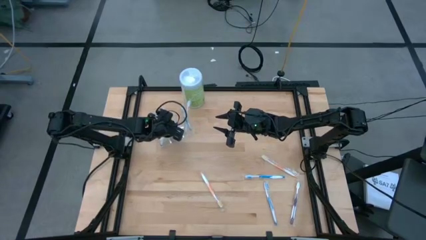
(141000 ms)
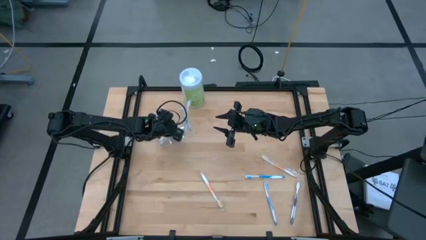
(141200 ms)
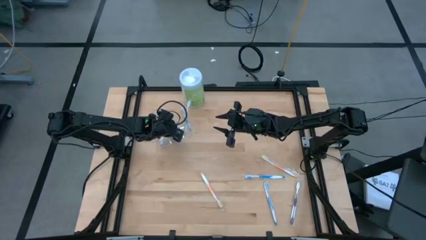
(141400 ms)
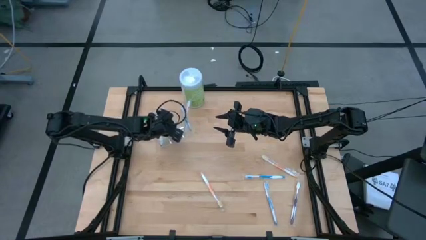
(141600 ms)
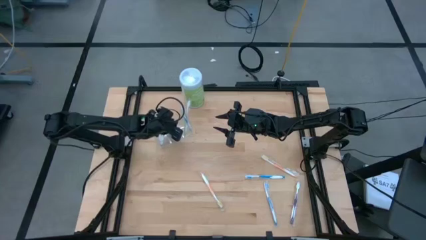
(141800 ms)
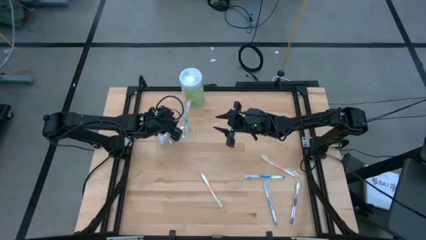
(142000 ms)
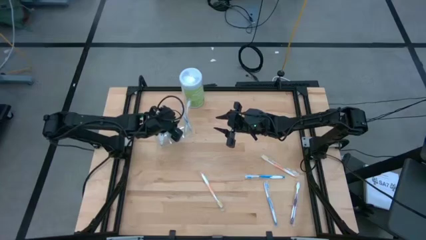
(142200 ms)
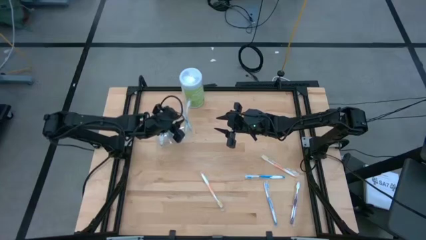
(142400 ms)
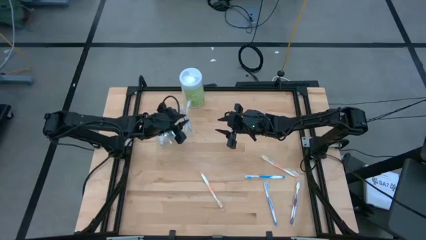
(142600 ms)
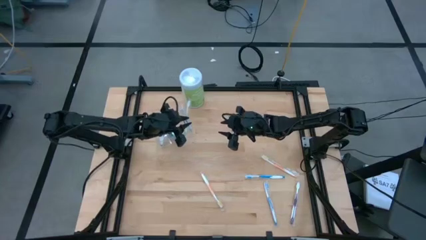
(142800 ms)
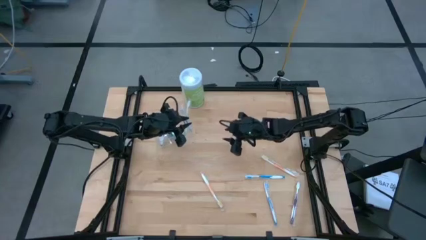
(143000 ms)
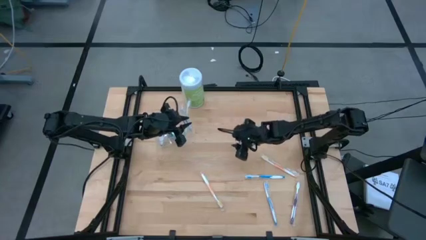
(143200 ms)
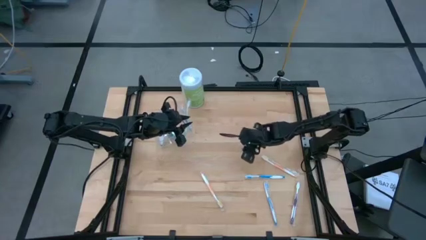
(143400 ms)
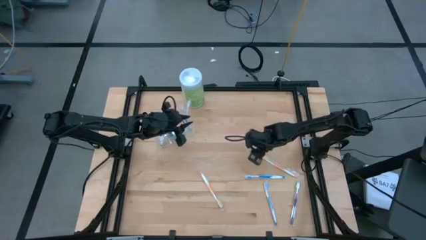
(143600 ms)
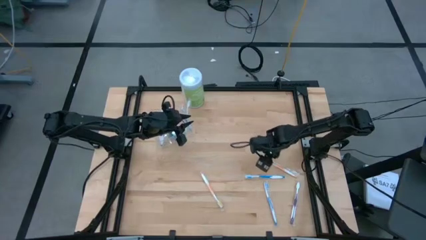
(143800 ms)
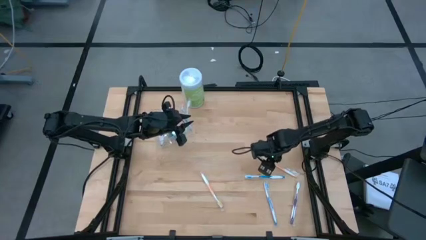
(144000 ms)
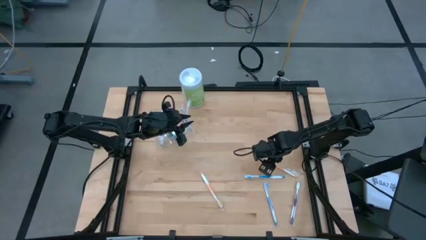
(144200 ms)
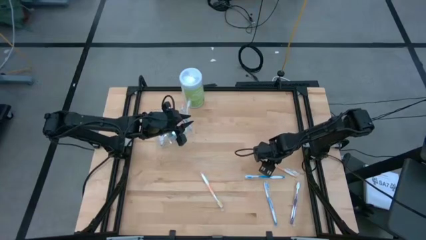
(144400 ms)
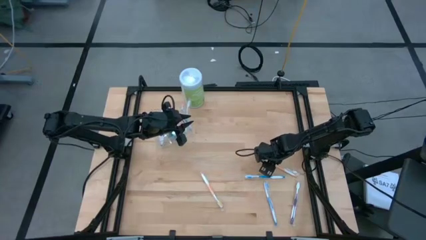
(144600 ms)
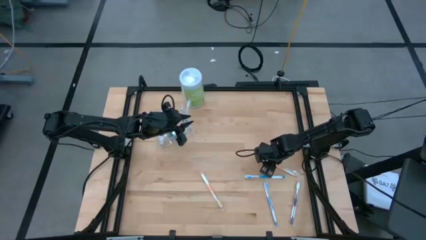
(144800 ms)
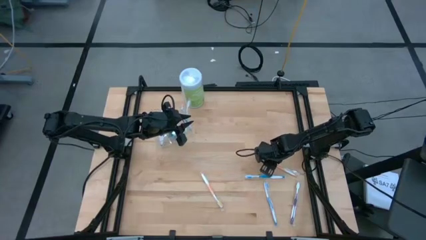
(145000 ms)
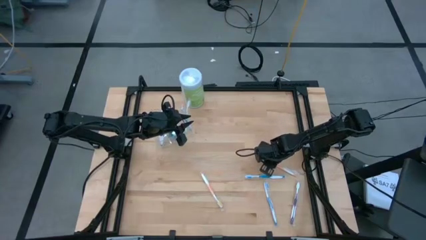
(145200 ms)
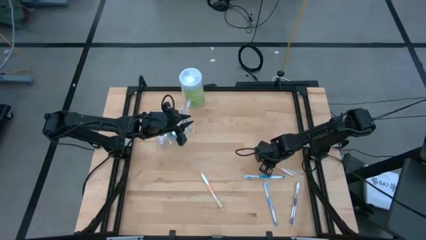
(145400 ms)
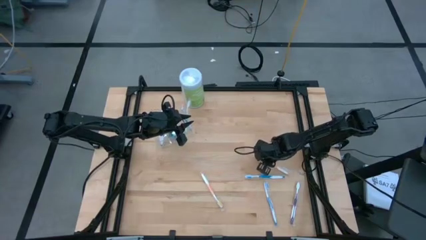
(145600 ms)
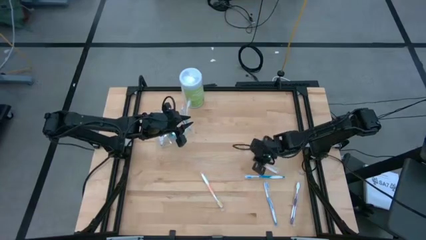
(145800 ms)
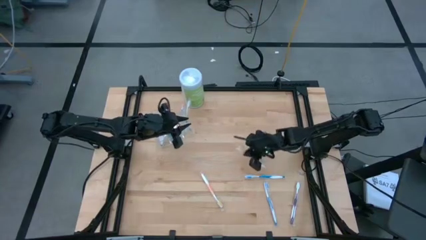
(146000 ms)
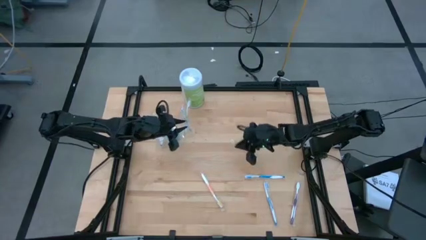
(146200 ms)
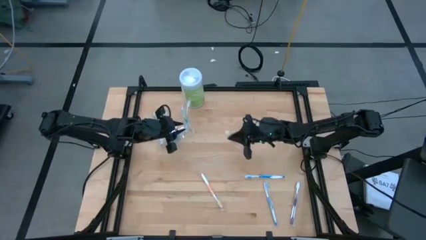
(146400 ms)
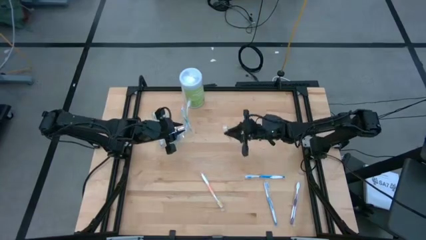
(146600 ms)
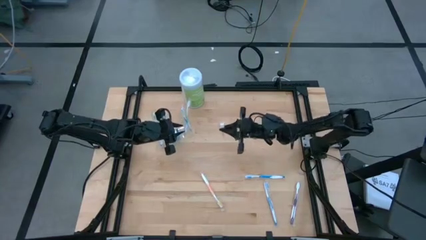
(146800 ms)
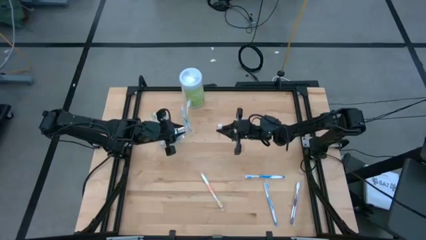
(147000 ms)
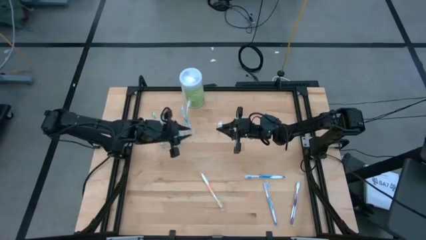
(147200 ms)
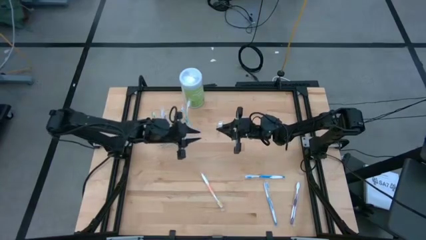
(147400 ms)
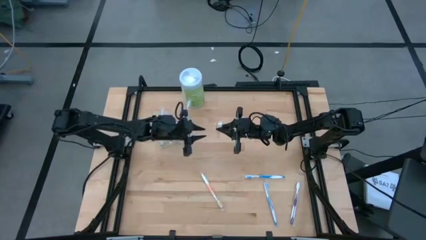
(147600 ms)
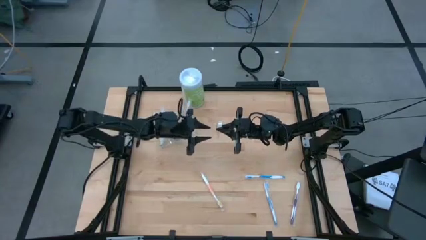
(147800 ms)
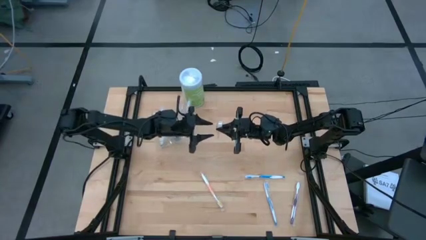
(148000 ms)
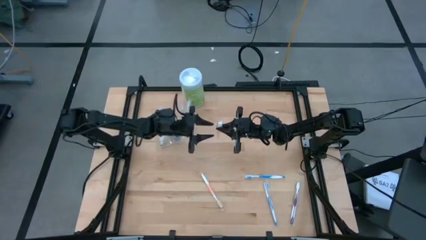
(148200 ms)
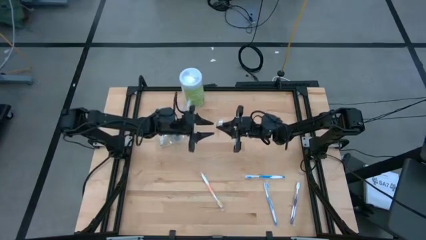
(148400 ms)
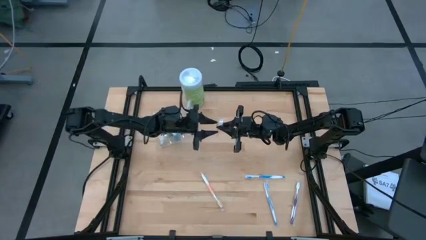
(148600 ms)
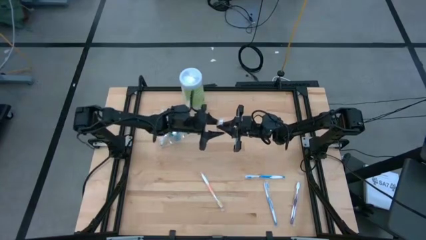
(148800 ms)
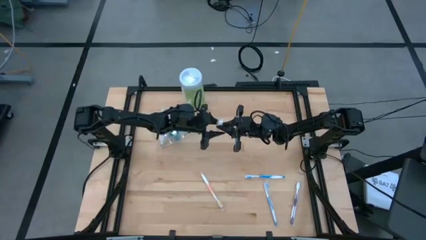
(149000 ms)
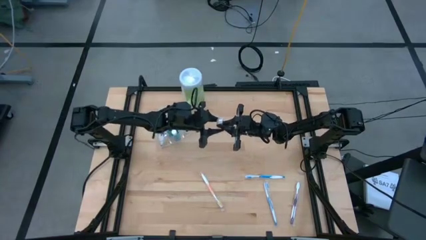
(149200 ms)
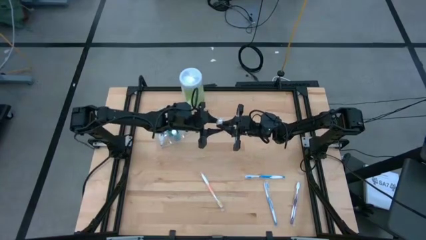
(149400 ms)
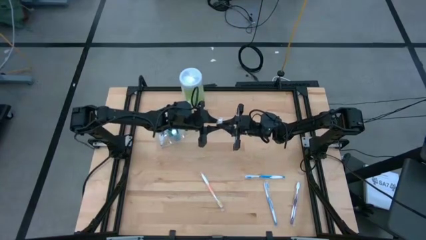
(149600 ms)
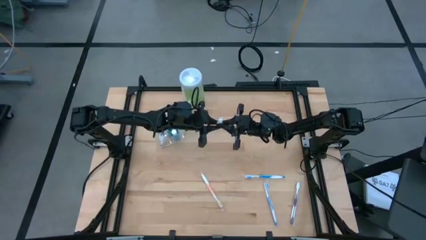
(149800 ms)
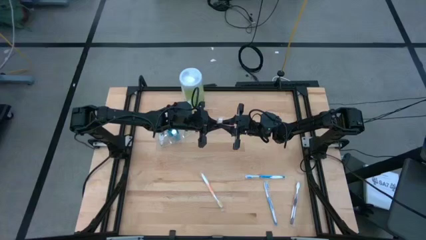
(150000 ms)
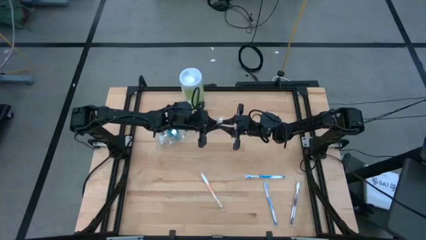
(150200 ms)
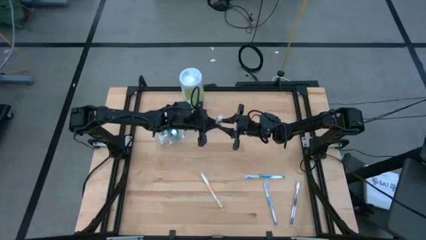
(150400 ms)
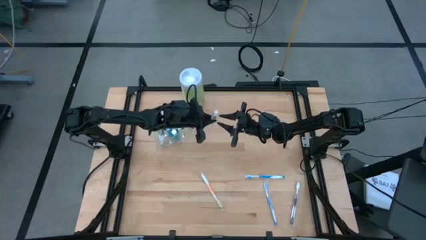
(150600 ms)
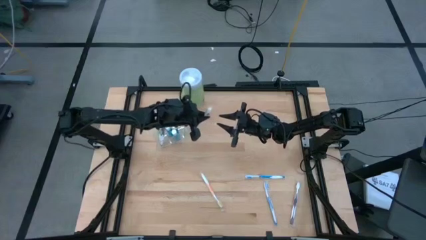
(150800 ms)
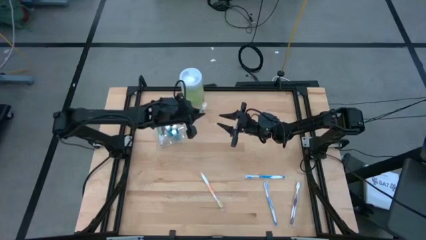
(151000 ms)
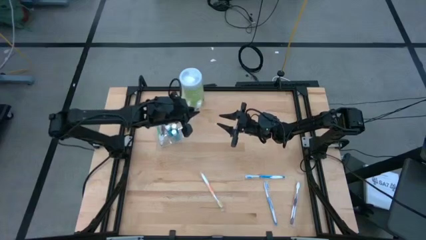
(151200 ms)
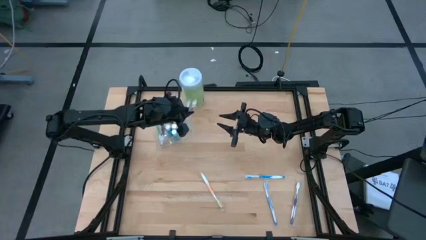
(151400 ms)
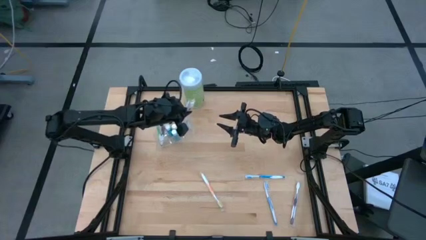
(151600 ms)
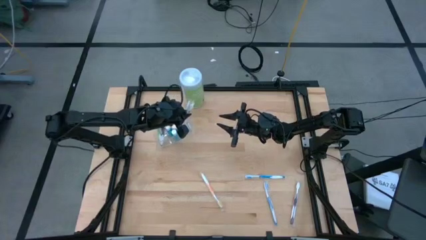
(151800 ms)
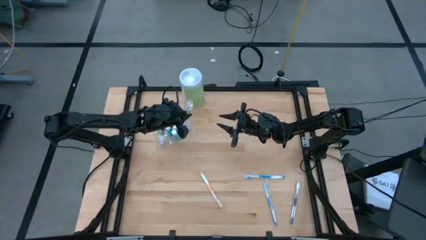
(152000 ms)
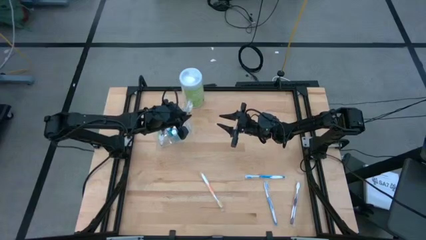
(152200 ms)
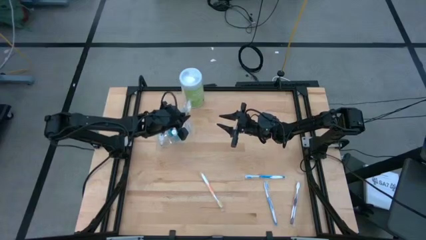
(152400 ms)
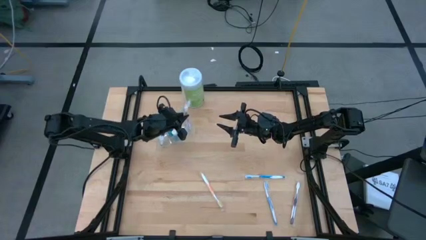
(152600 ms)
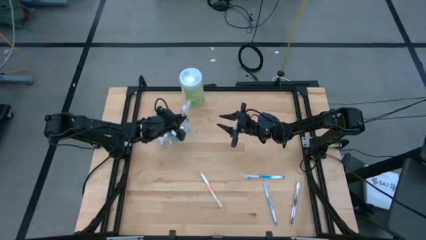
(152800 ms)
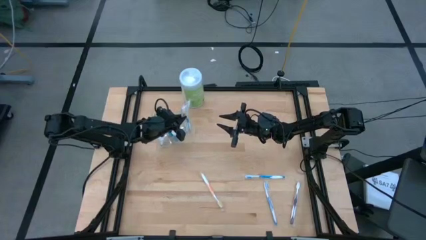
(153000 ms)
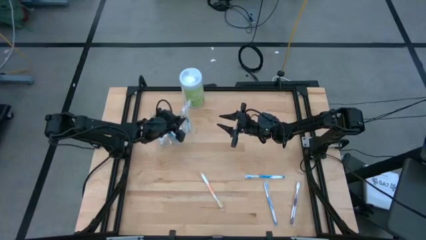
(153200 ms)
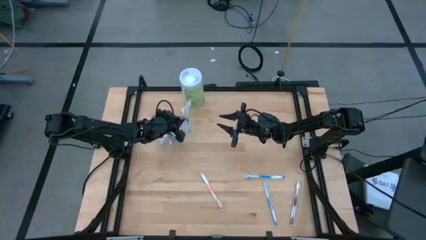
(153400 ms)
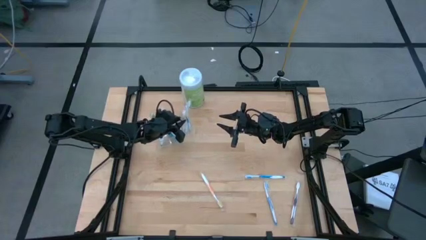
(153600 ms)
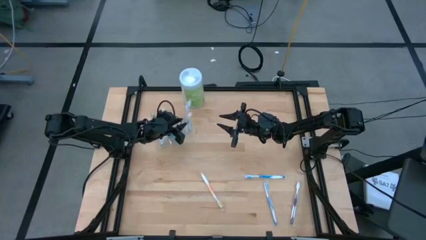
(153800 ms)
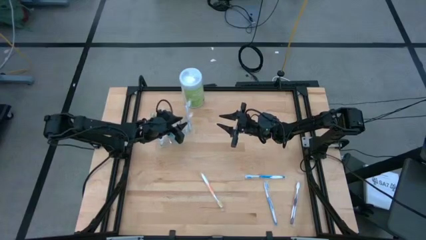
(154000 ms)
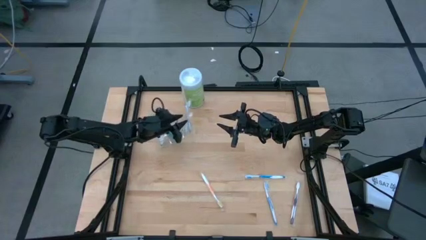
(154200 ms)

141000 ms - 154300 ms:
Task: Pick & Place toothbrushing station
Put the right orange toothbrush into the transparent organizer

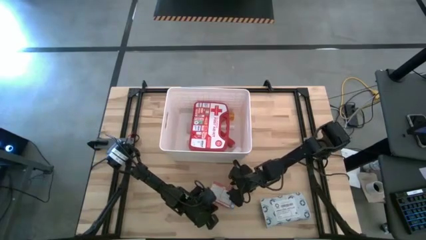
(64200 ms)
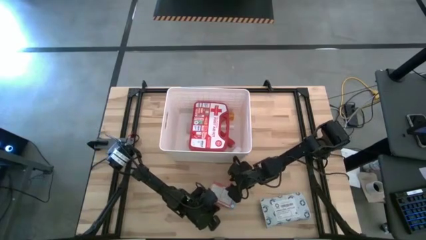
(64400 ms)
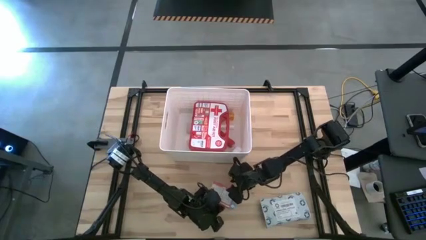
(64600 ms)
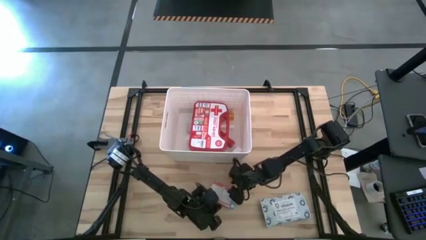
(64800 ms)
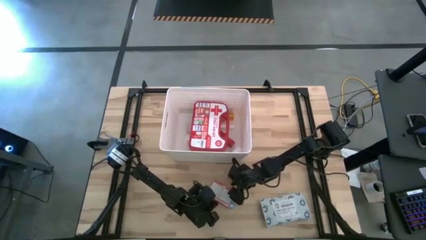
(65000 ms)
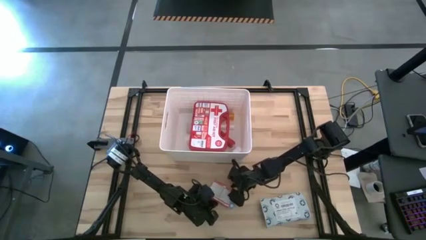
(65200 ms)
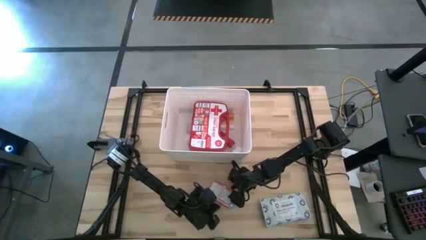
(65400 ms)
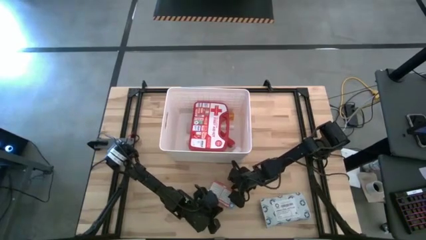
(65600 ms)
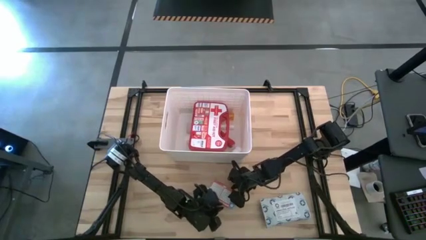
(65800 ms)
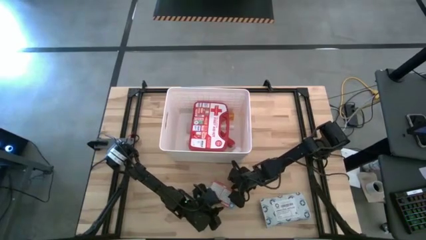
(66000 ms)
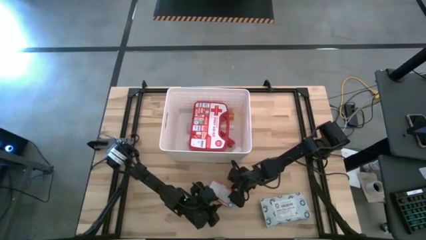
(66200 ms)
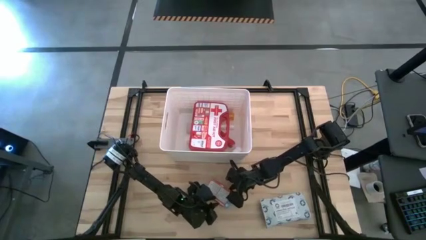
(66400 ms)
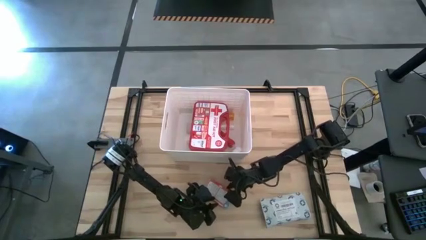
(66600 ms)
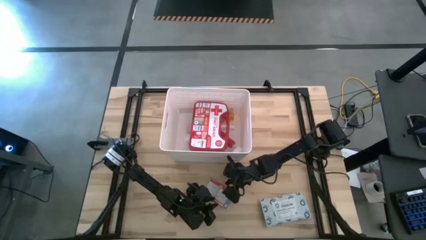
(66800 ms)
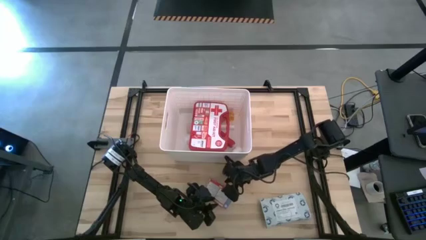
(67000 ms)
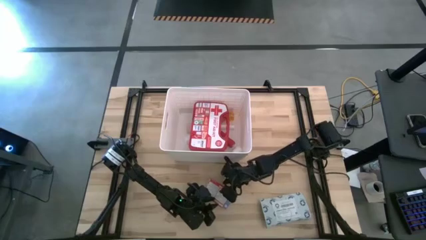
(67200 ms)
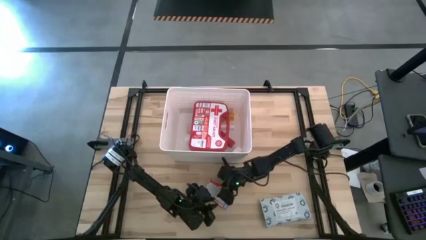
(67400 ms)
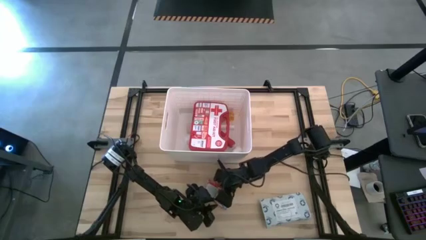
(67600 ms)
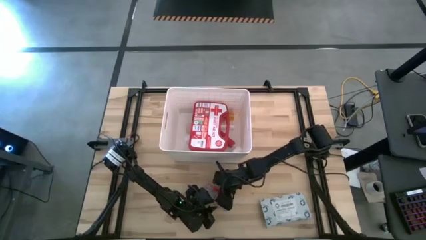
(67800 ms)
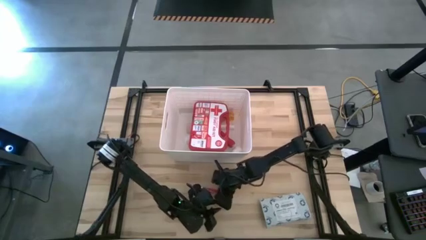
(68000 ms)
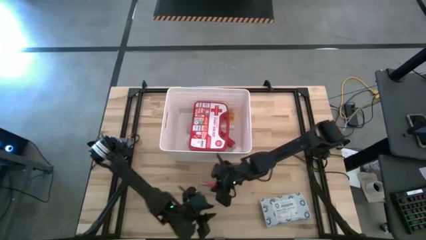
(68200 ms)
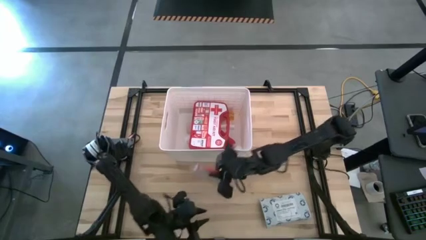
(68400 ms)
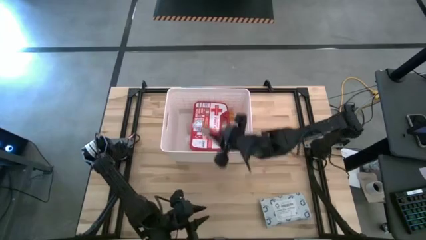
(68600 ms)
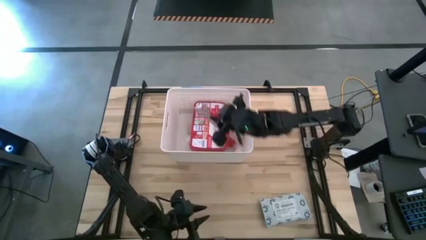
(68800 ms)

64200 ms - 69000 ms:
Task: Pick & place medical supplies in basket/bin
Put the red medicine box into the white basket
